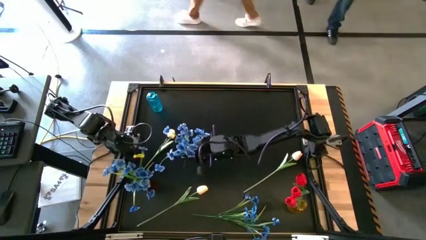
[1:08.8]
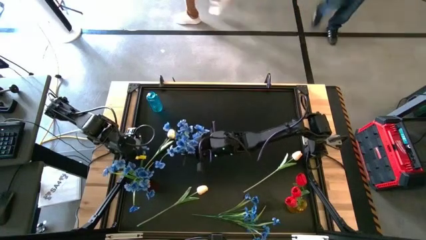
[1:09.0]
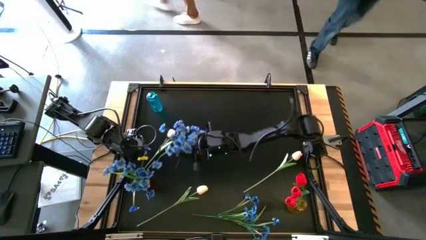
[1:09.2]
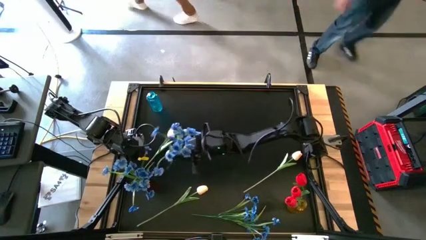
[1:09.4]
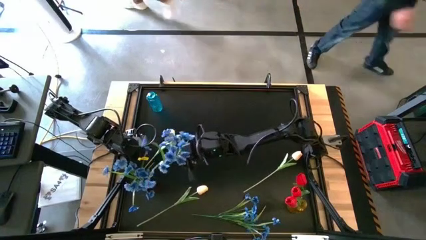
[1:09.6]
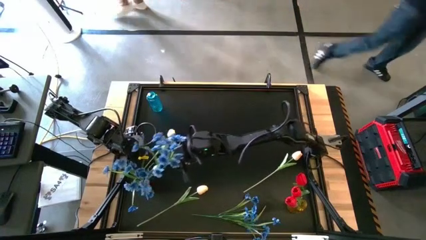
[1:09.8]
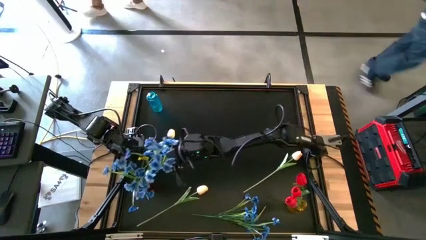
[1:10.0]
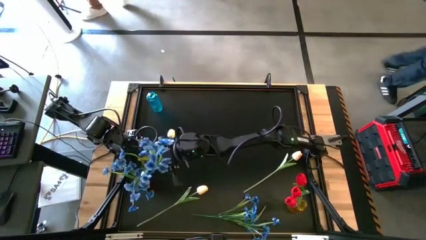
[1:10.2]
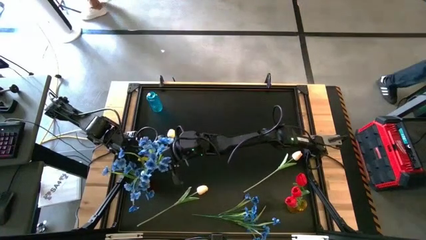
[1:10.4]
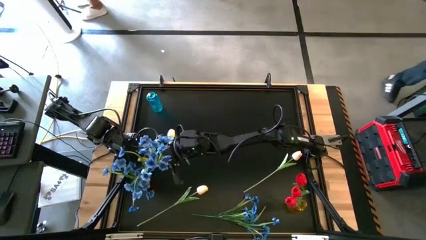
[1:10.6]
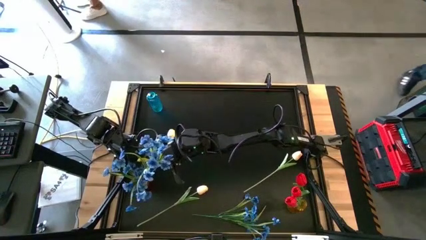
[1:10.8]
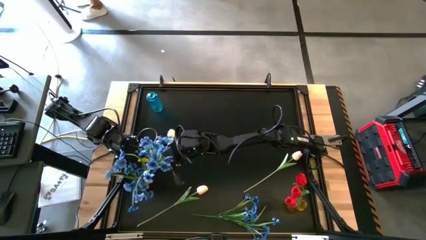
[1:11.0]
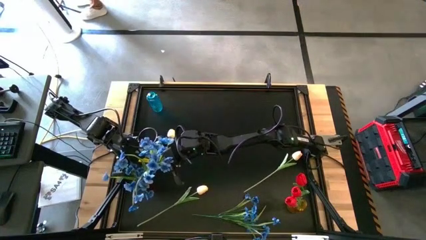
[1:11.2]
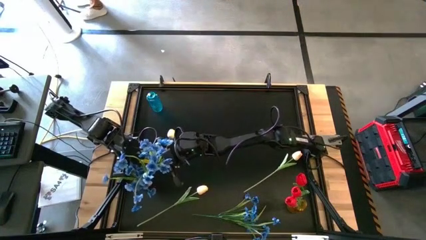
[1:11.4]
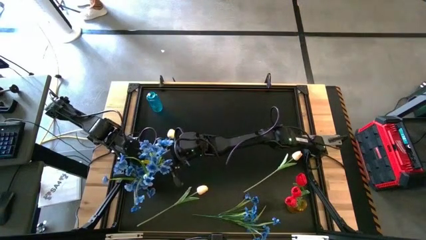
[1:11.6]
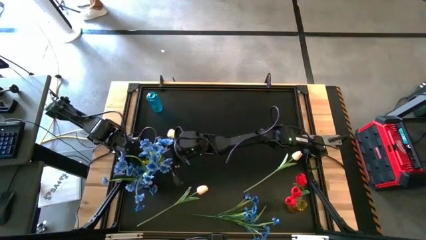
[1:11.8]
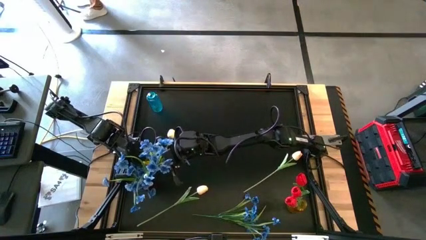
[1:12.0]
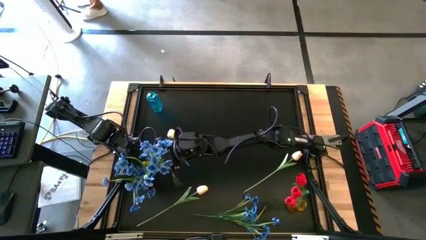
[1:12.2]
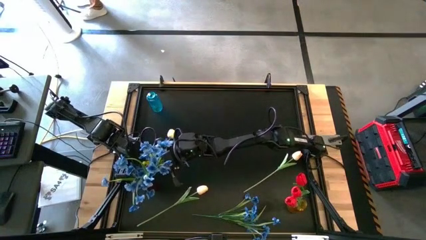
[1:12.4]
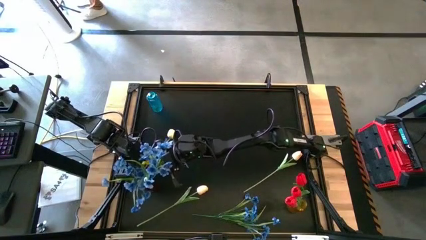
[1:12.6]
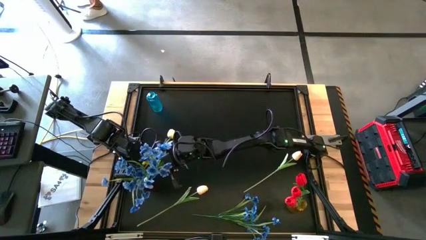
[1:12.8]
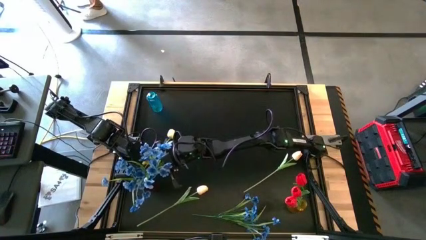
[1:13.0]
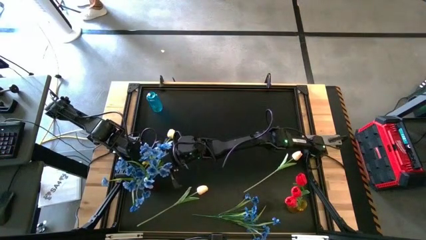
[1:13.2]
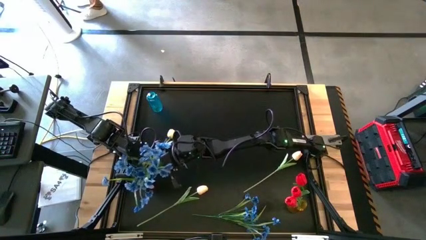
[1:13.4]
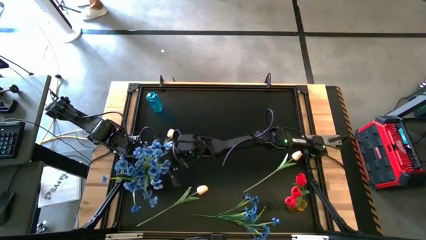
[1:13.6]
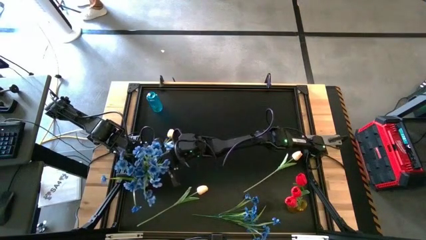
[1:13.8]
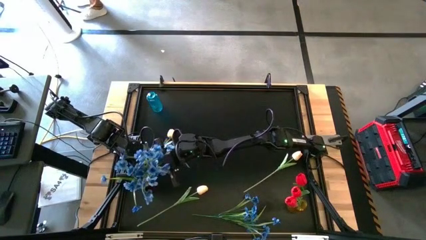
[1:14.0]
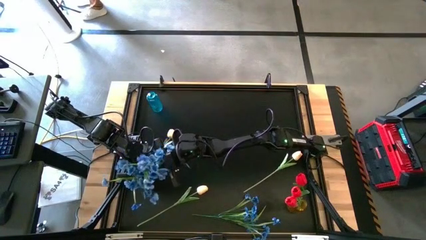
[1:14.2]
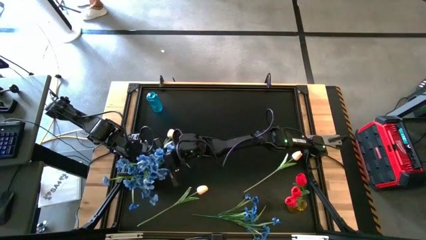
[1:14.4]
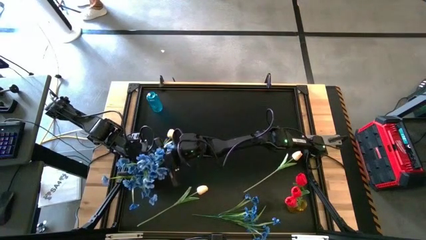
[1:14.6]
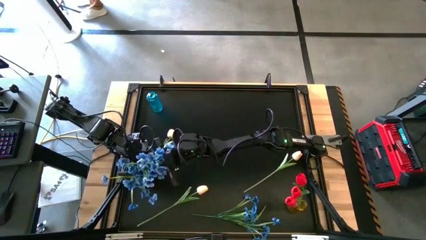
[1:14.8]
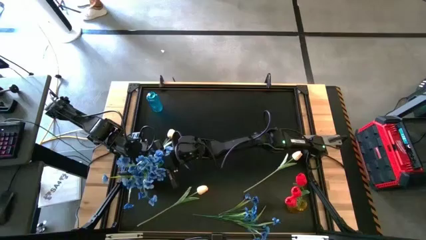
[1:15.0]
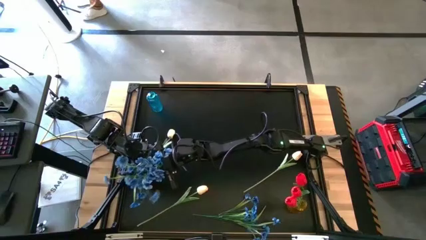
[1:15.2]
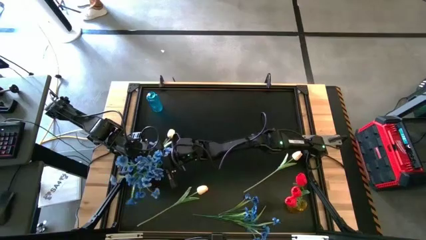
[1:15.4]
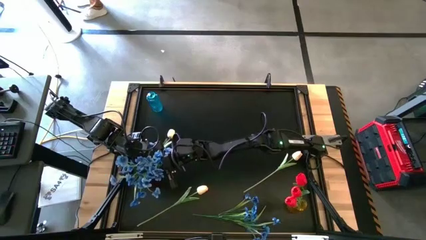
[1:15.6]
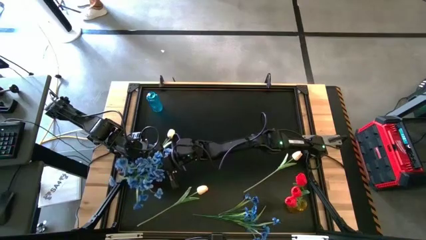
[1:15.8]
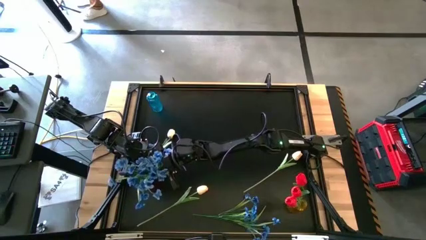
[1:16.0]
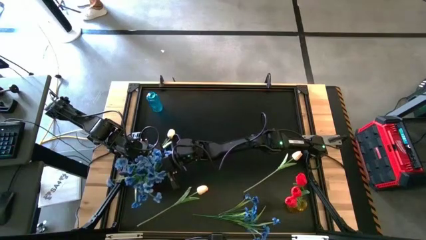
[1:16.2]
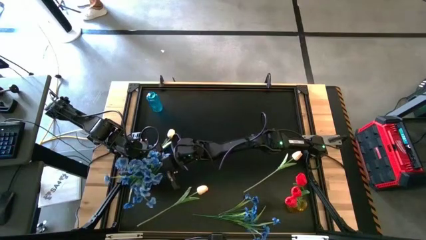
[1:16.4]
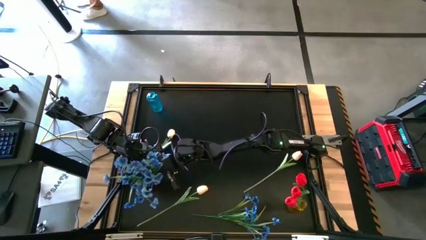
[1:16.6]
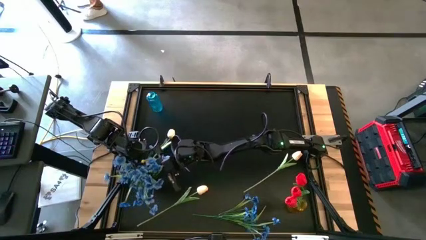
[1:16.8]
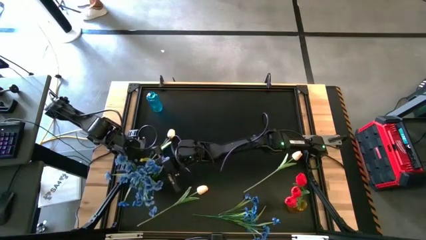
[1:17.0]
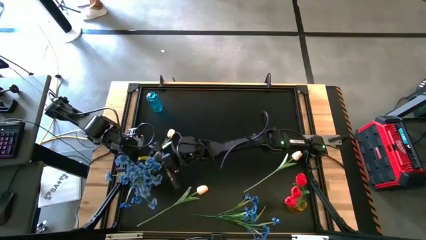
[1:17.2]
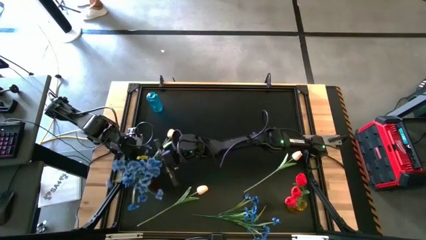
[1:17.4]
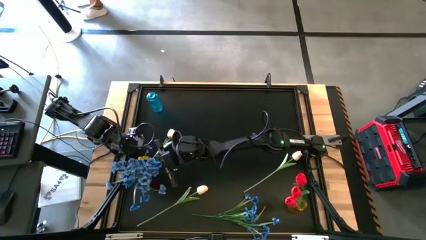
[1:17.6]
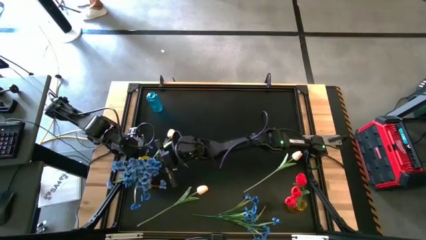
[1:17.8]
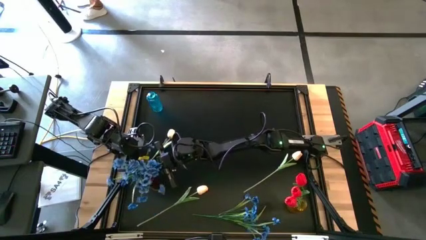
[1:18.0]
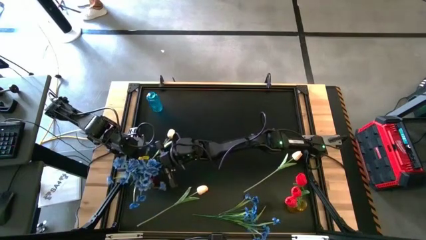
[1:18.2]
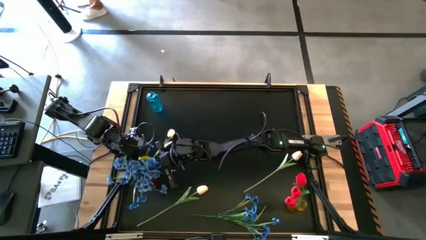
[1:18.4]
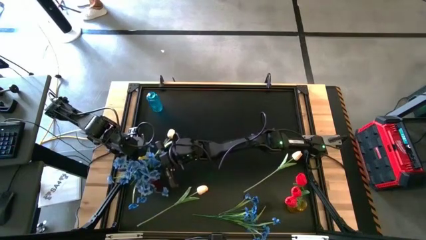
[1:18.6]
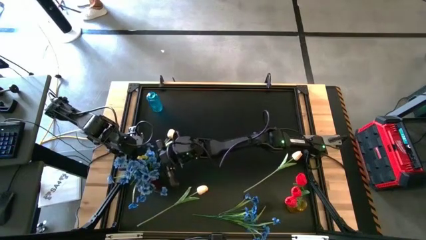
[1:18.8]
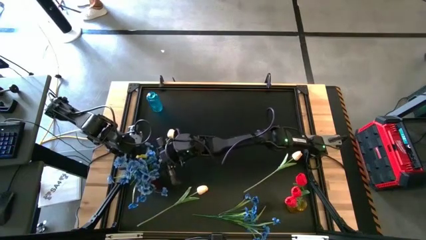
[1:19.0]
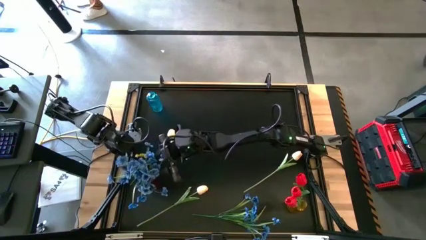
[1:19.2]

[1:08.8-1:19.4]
Task: Sort flowers into vase by color
Put the top blue flowers into the red vase

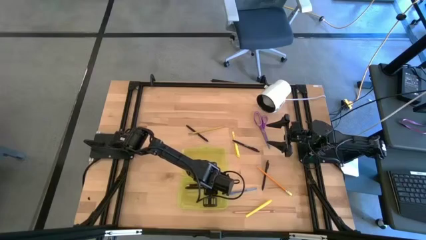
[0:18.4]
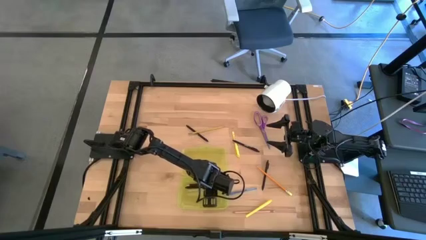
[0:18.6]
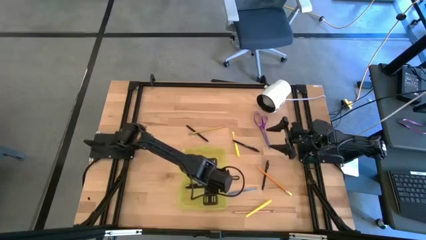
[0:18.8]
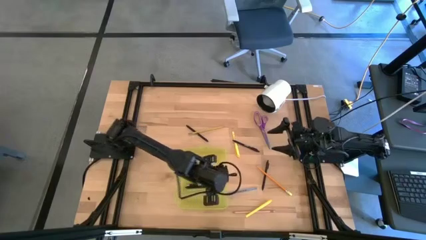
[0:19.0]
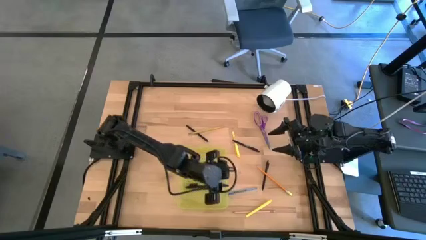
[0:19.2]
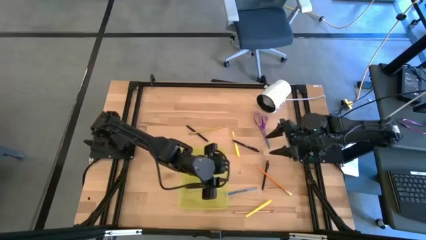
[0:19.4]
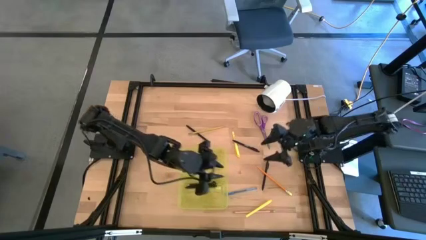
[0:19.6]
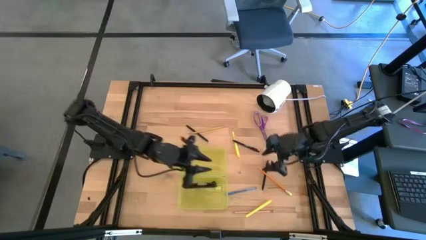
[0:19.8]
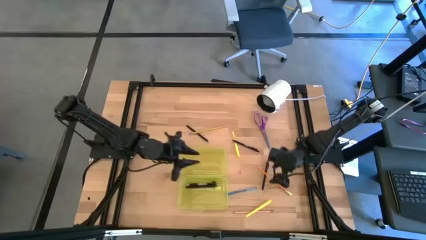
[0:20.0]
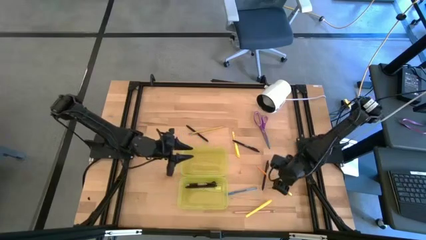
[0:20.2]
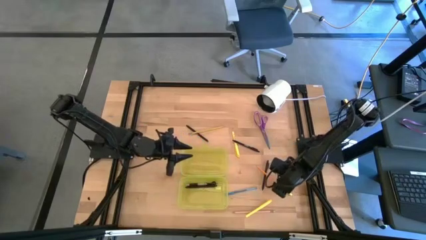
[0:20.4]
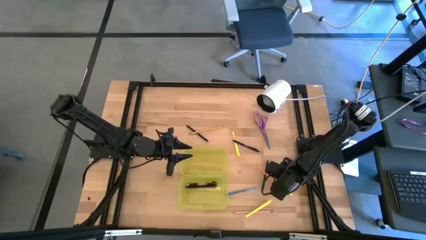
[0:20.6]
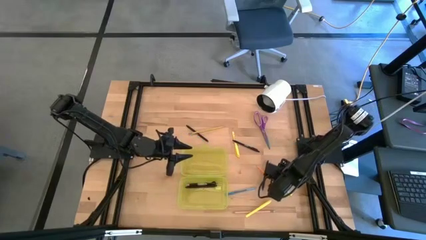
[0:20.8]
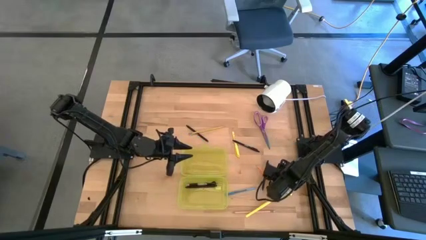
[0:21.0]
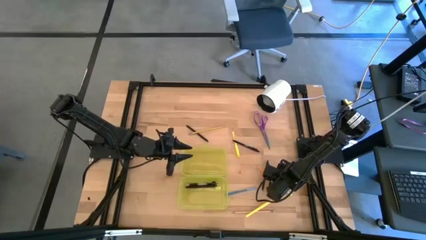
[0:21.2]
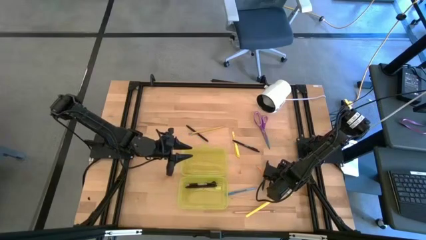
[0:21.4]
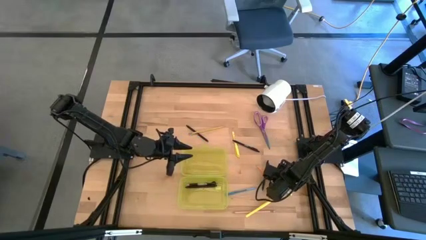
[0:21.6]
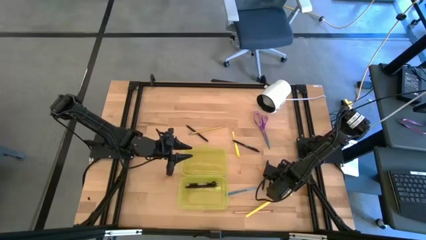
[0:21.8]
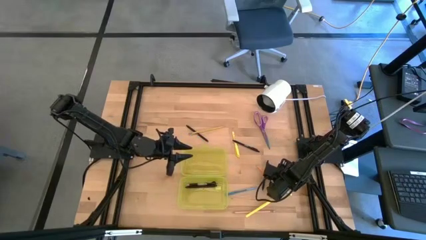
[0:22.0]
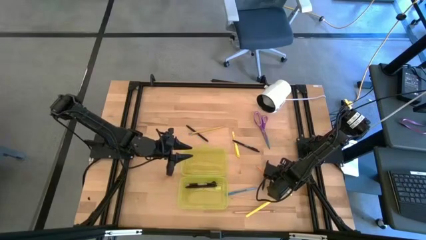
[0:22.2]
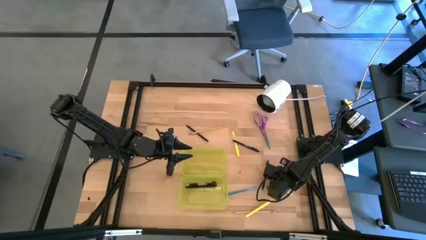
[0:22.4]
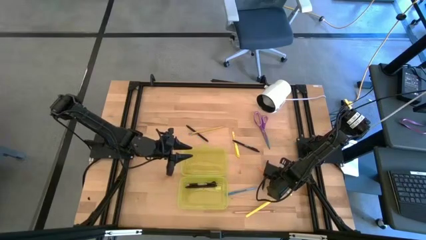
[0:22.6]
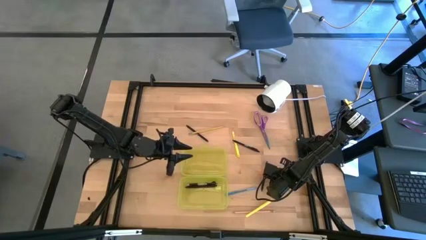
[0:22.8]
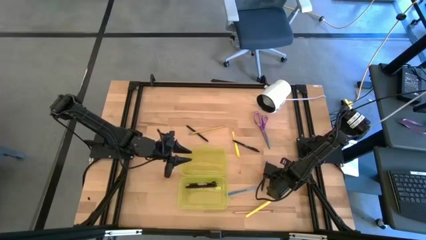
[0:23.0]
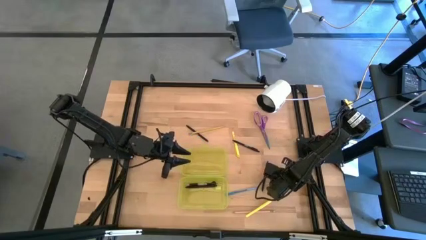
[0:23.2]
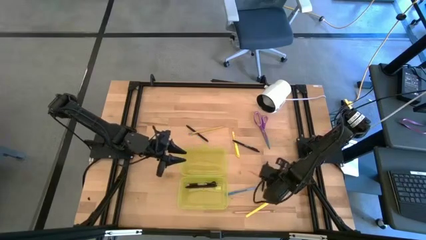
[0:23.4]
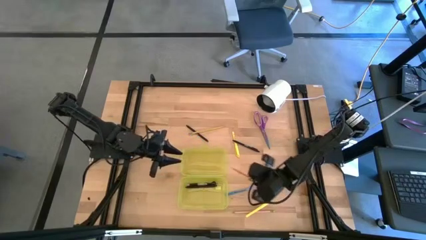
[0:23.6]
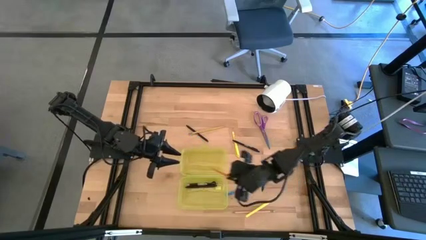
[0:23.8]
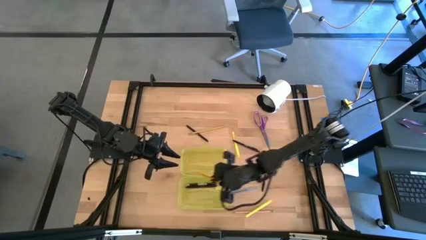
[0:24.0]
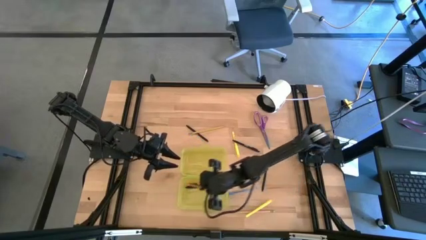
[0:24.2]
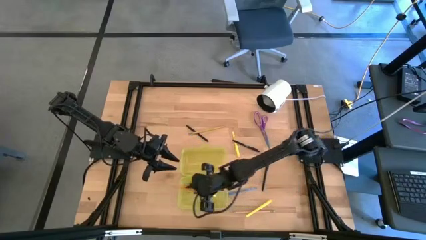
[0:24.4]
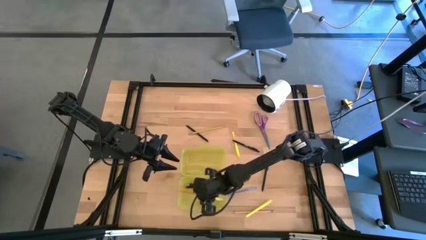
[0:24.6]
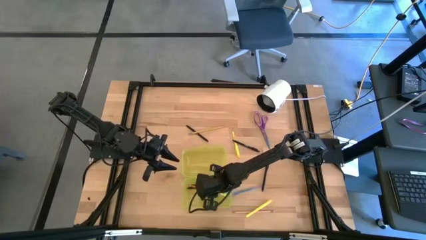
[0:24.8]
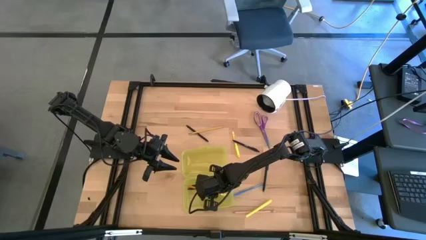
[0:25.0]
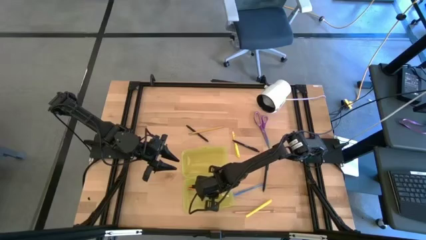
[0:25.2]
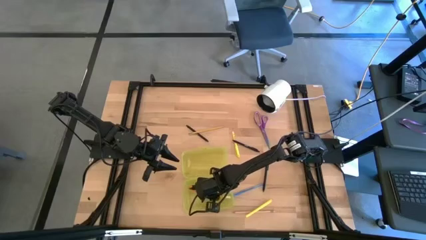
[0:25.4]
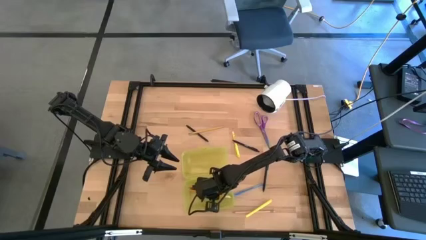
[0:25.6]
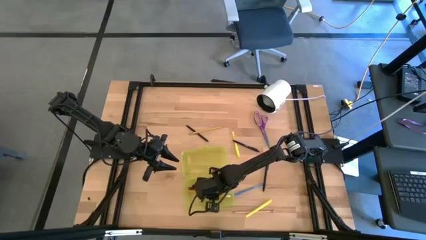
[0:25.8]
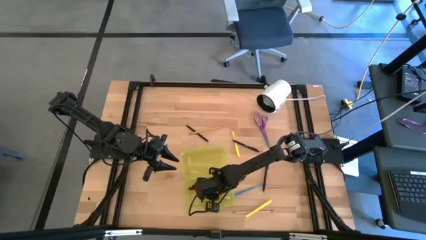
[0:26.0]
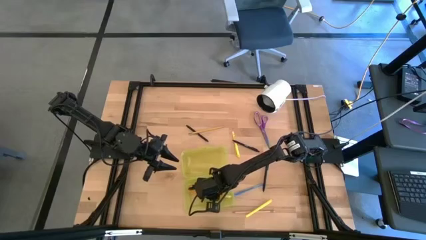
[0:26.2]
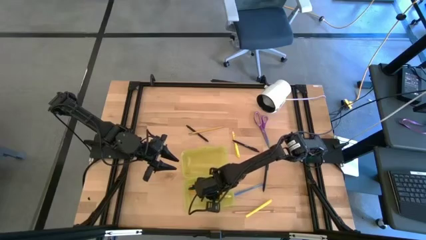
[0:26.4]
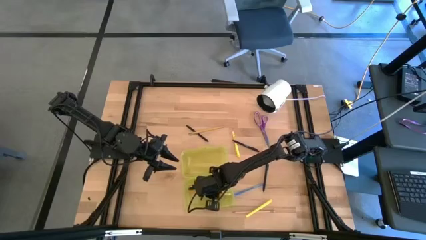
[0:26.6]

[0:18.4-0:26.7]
Task: Pick & place school supplies into a supply box
Put the orange pencil into the yellow supplies box
